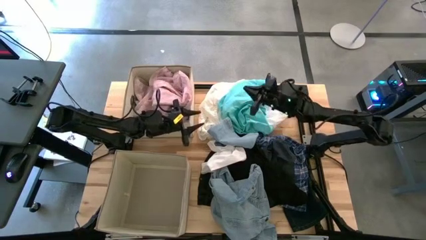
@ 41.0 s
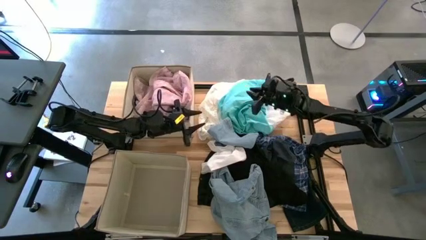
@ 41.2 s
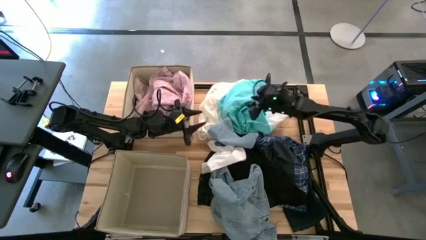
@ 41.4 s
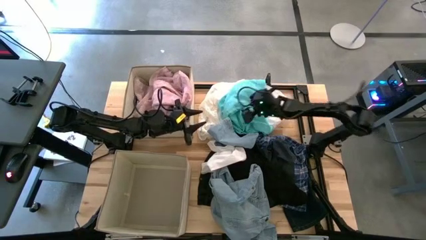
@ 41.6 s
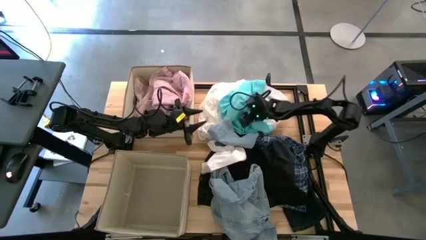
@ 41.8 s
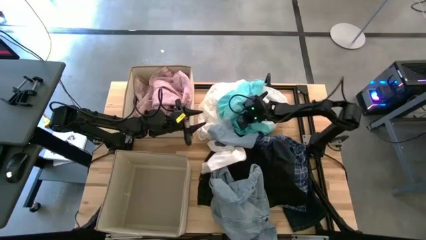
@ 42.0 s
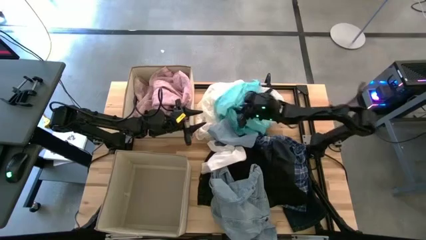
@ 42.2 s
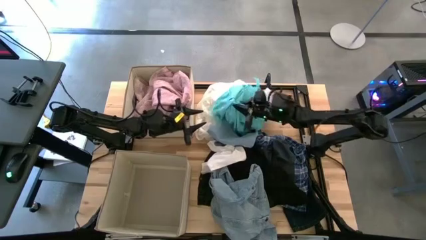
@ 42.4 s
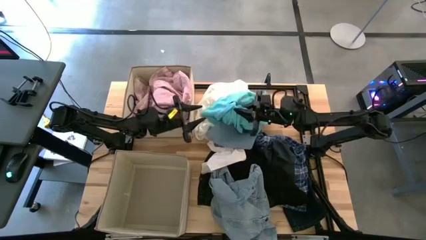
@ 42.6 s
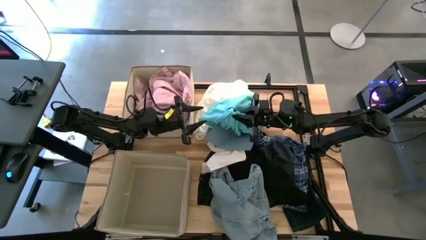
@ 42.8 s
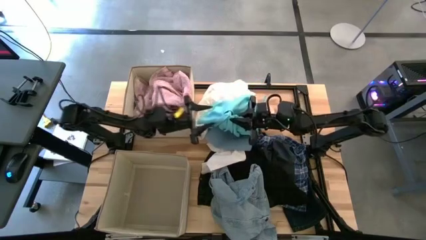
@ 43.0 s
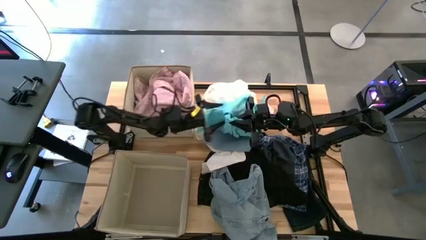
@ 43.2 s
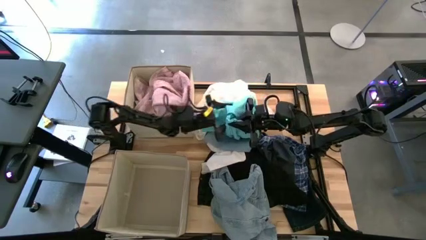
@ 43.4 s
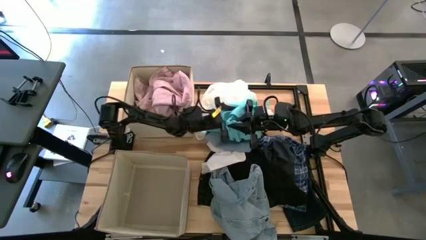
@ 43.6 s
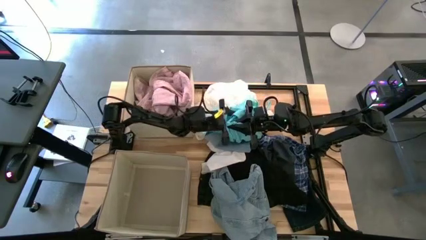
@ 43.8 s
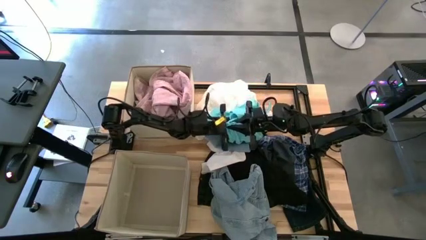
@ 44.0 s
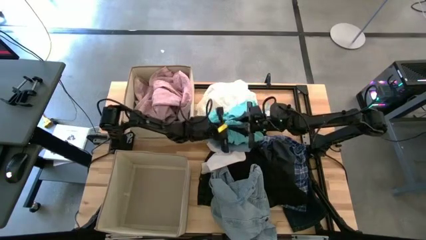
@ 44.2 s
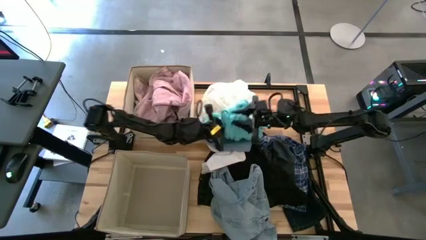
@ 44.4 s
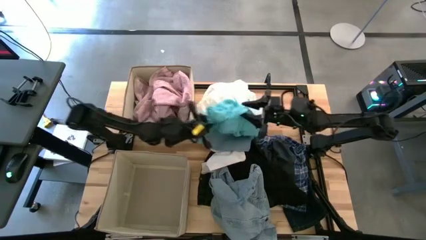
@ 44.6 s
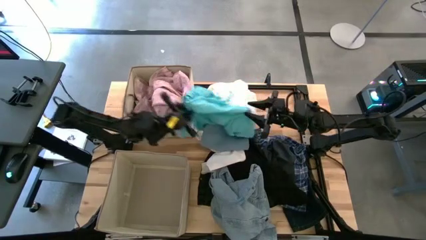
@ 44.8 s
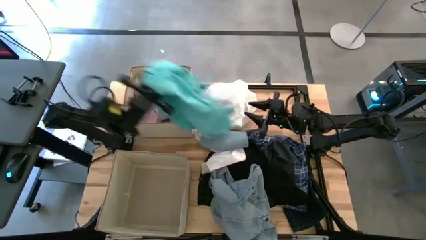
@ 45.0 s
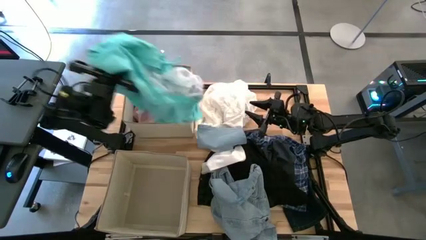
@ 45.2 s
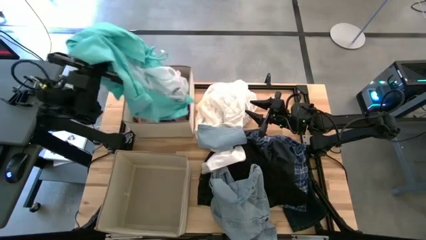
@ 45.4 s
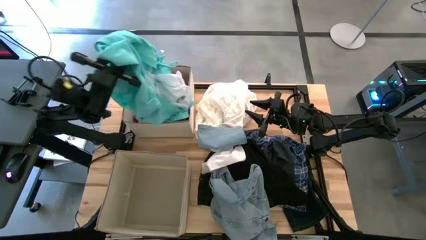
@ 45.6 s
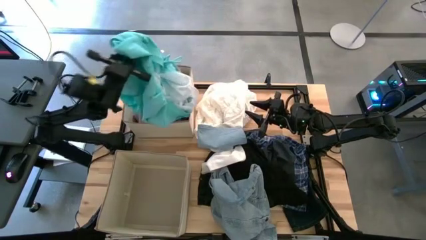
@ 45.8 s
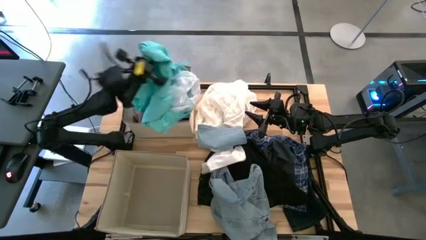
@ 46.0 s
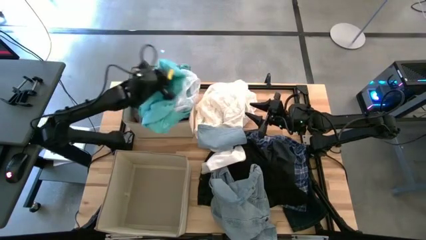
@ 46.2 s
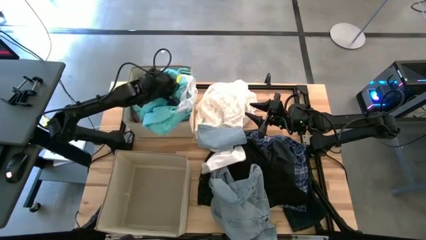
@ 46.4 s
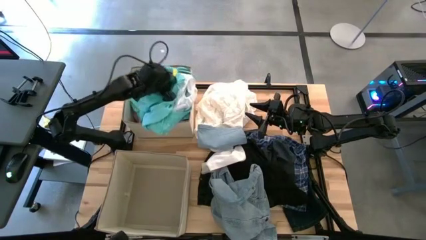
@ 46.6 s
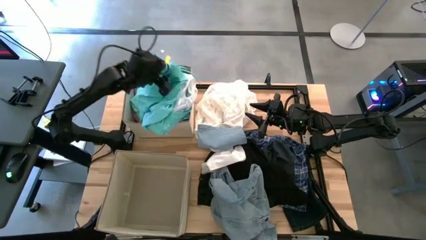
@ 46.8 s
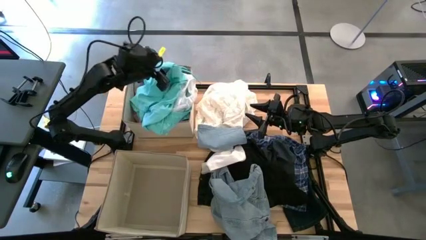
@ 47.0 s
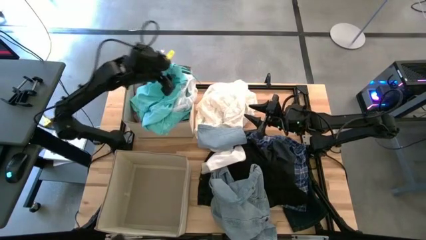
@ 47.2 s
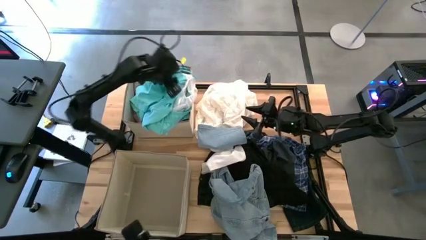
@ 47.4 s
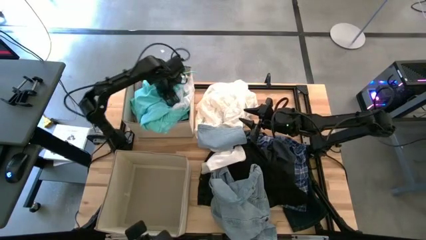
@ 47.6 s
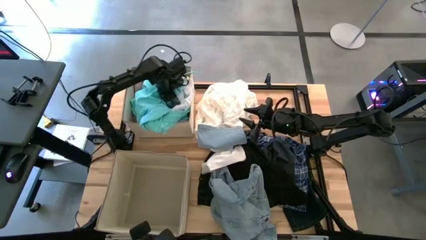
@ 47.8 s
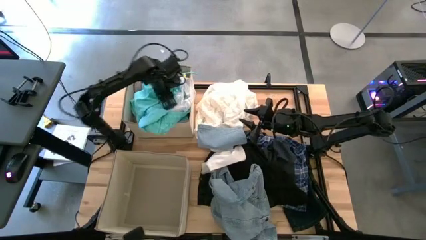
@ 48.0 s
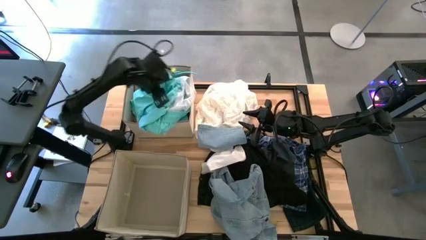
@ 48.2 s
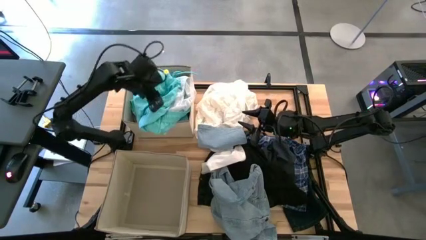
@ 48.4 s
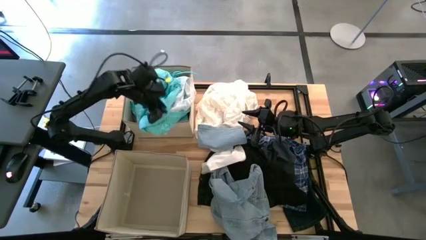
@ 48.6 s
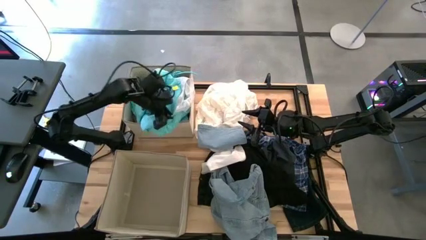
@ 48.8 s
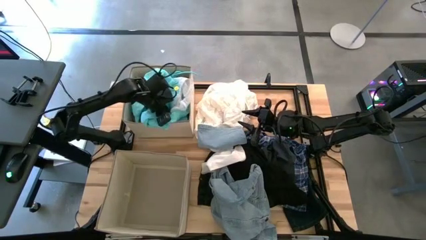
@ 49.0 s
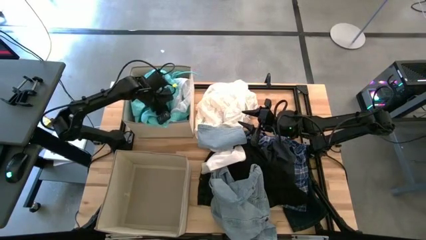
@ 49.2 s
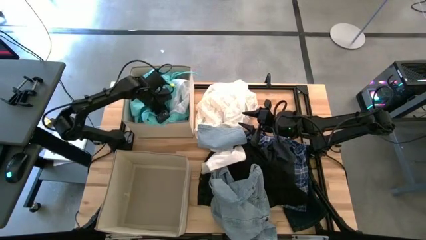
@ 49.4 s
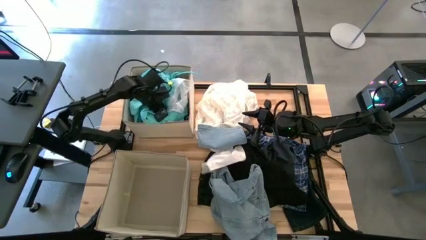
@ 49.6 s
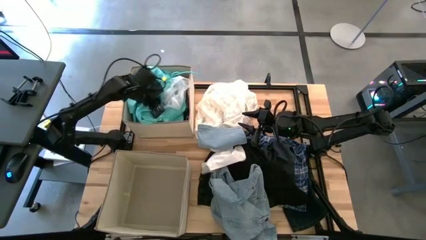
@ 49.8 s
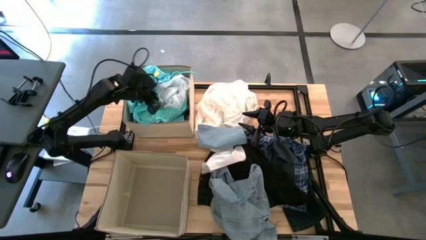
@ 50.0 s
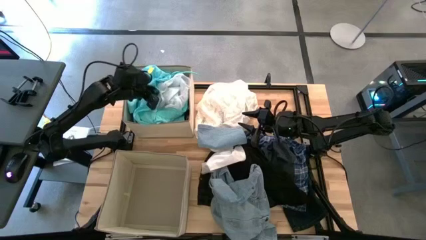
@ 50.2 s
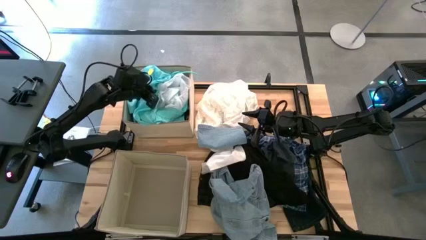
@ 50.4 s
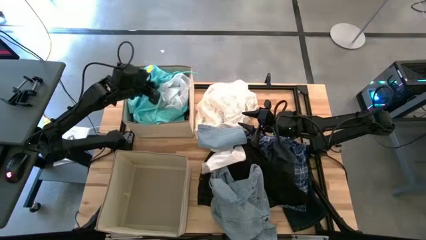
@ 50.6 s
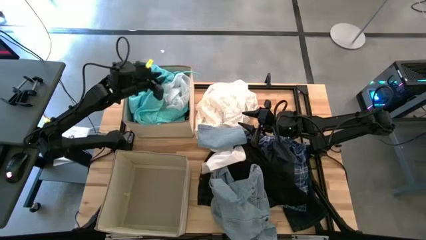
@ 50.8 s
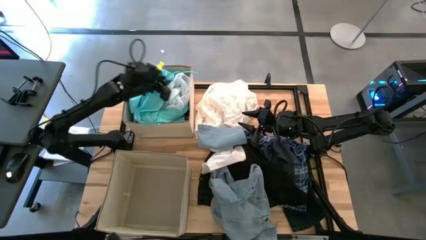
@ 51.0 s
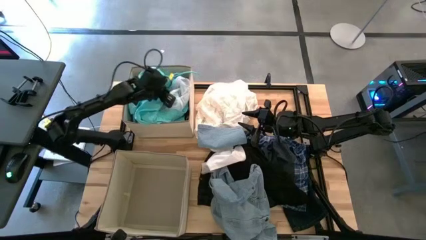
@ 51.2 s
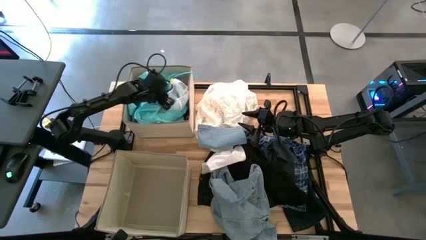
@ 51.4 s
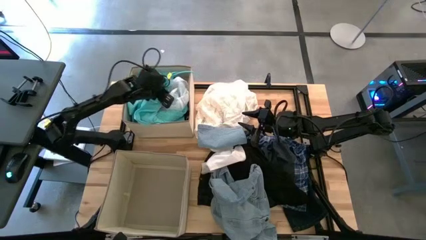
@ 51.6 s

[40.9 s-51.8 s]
Task: Sort clothes
Put the blue shorts into the top brown laundry organizer

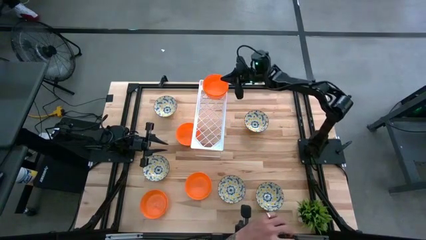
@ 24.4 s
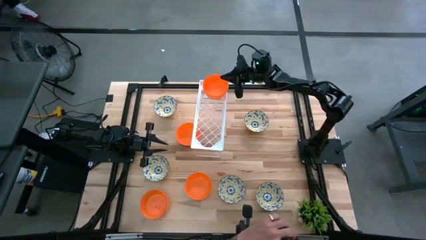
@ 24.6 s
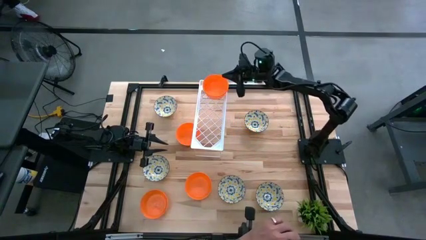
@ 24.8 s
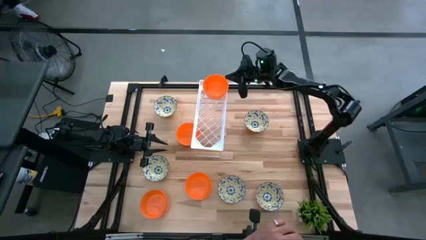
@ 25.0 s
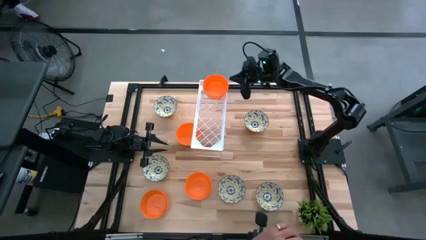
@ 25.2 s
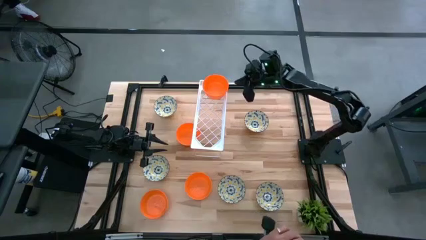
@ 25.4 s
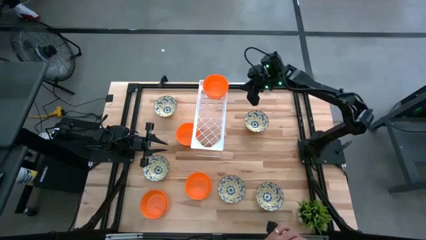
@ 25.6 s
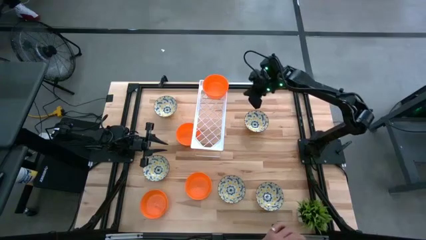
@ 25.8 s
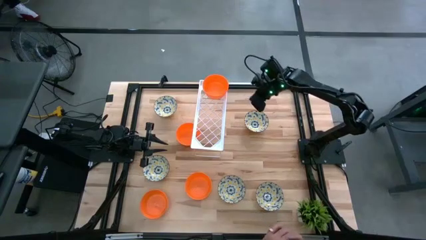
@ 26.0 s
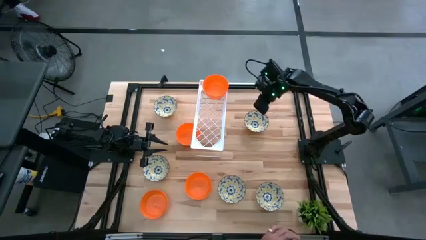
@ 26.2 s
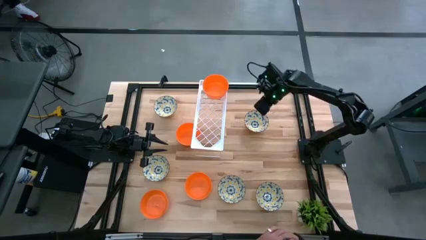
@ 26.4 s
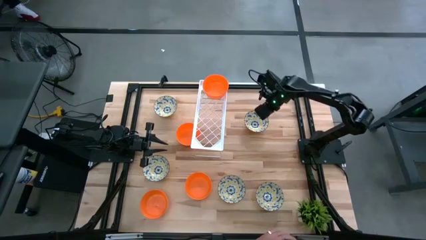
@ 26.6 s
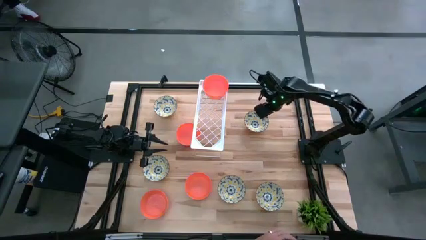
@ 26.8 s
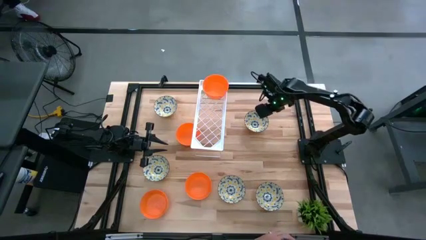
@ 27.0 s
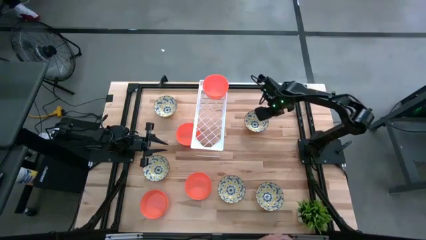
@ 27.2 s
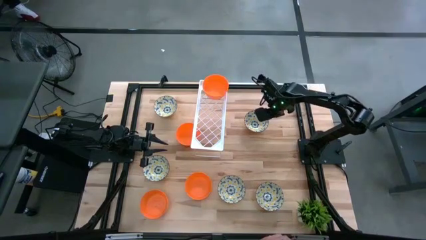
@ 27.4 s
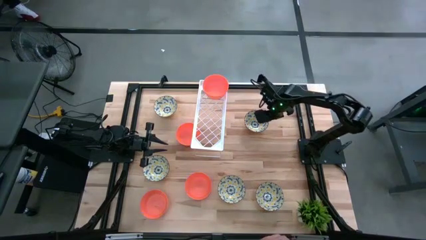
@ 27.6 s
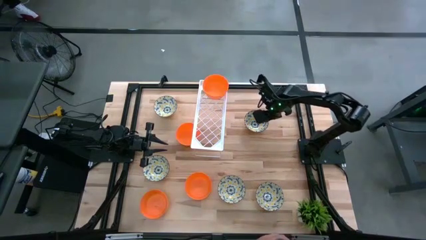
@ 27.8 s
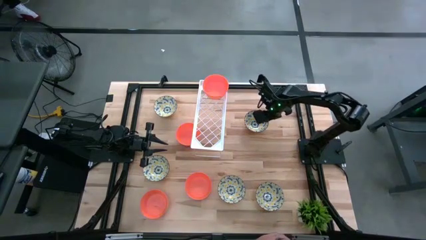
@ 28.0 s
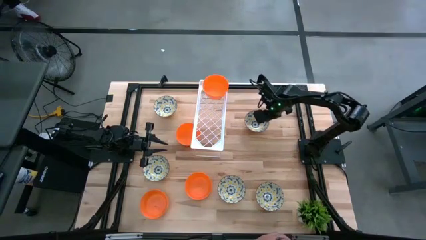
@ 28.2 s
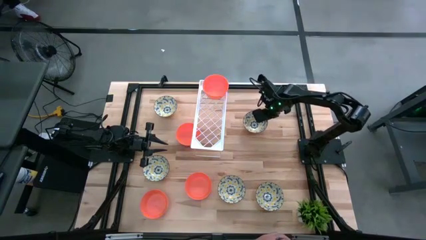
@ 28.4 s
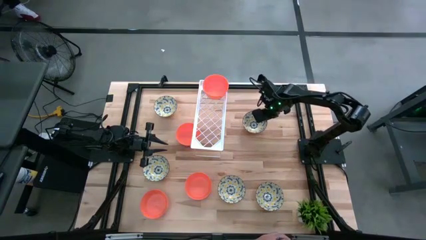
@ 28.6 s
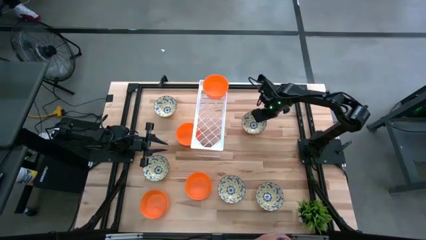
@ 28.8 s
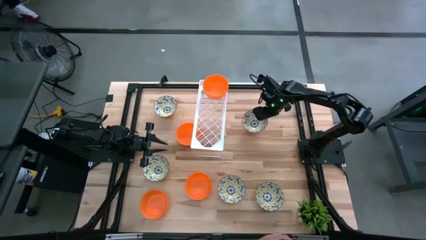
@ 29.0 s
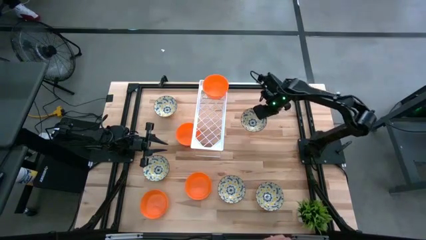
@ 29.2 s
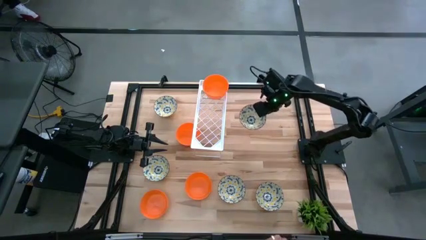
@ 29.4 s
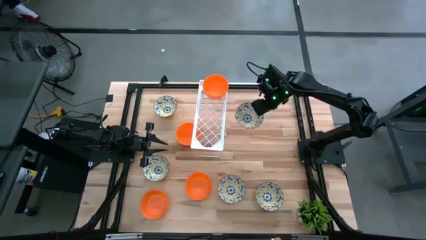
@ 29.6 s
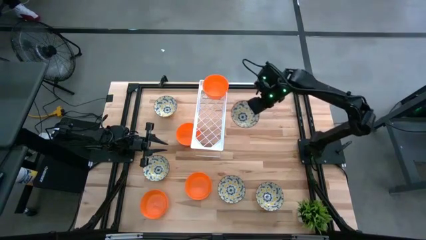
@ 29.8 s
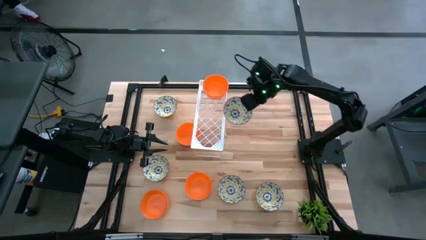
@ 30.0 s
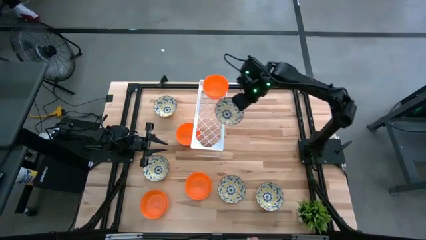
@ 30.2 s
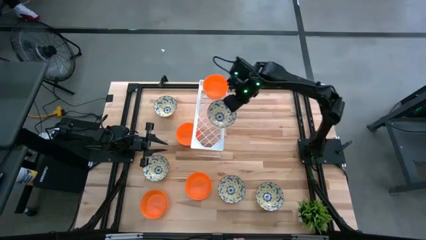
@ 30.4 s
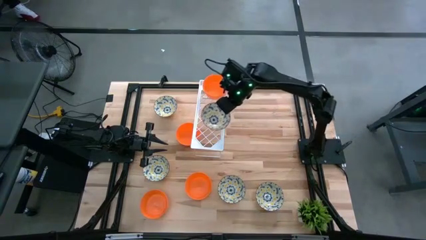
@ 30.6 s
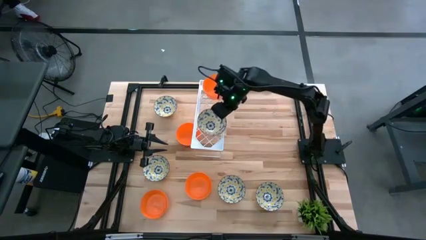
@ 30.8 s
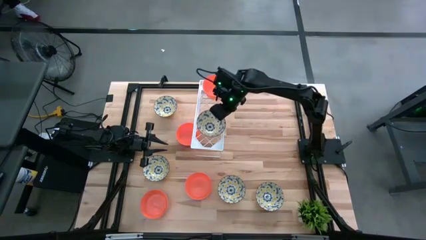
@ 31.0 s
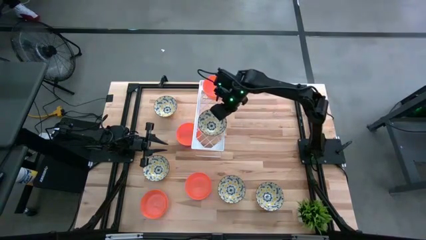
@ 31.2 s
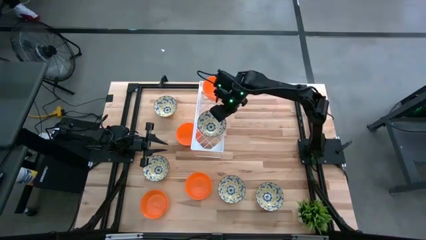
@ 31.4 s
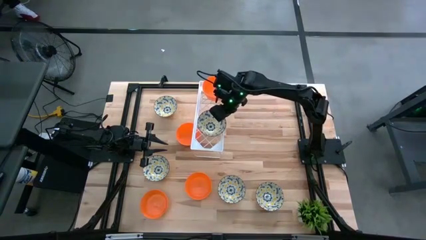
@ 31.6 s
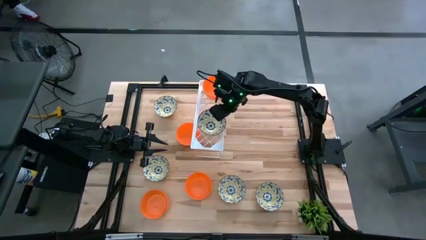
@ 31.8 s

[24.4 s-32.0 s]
Task: Pick & Place Mini bowls
Put the white and yellow bowl on the shelf
